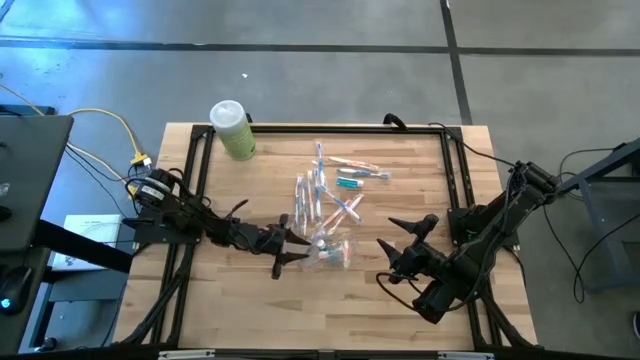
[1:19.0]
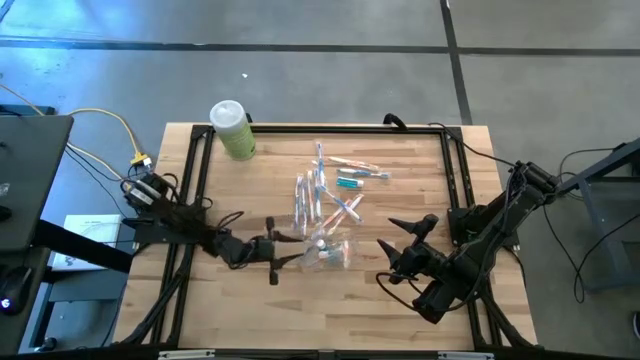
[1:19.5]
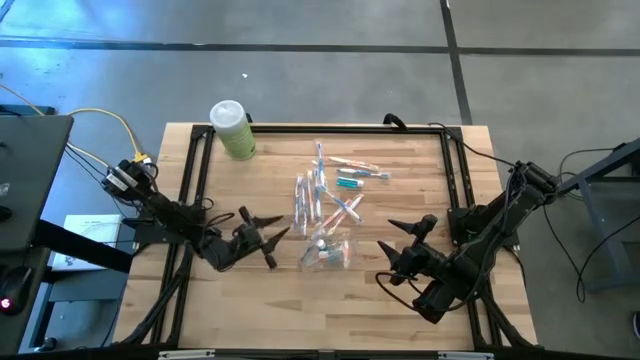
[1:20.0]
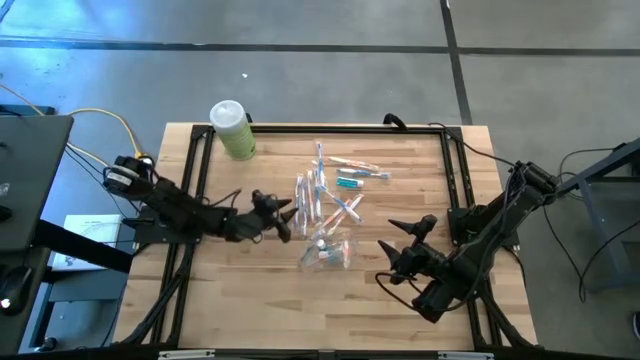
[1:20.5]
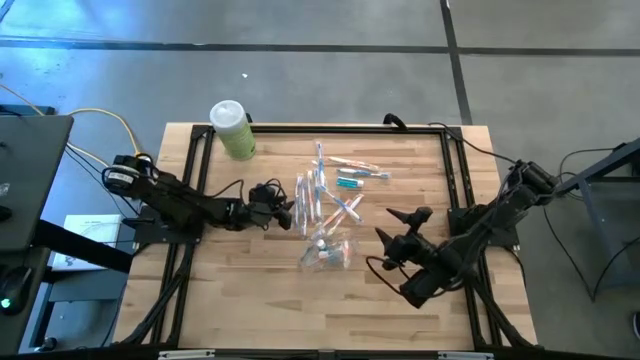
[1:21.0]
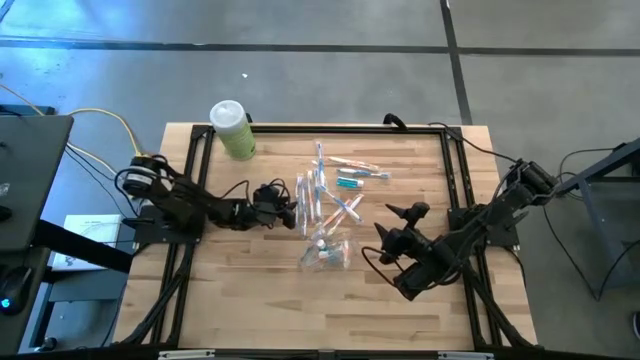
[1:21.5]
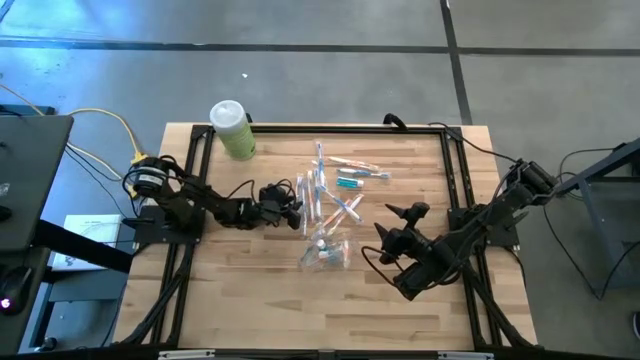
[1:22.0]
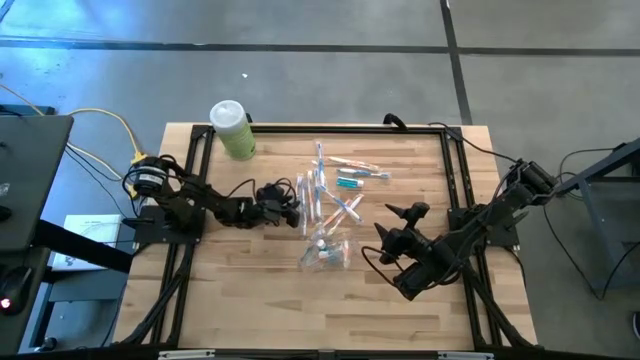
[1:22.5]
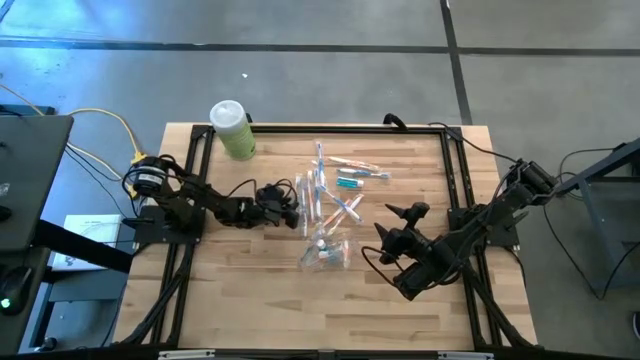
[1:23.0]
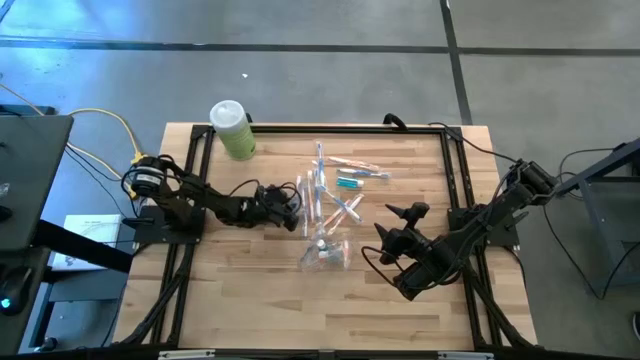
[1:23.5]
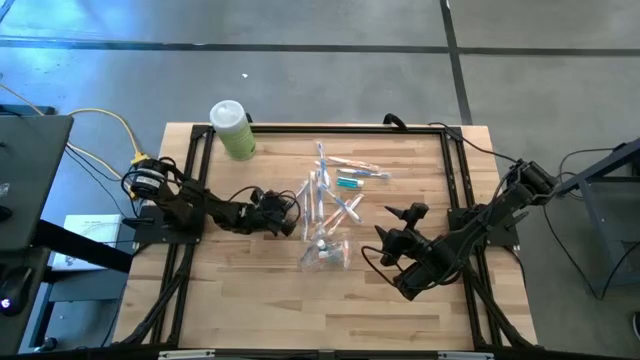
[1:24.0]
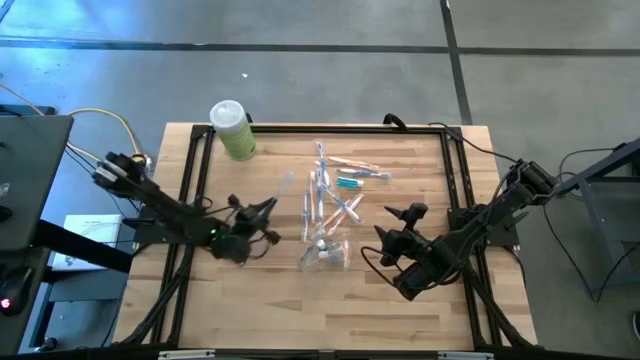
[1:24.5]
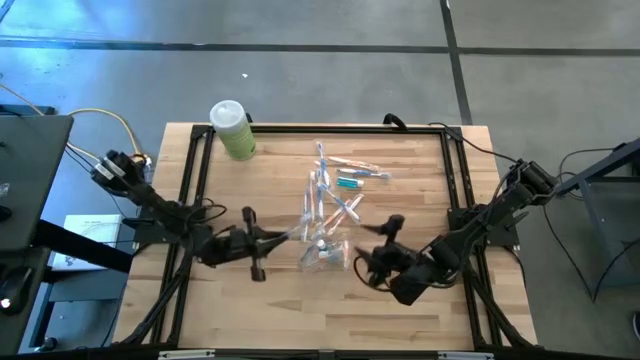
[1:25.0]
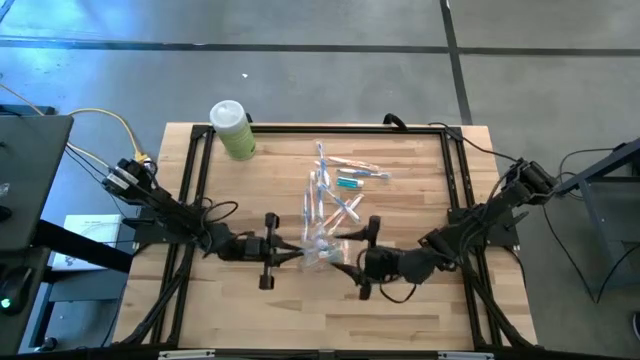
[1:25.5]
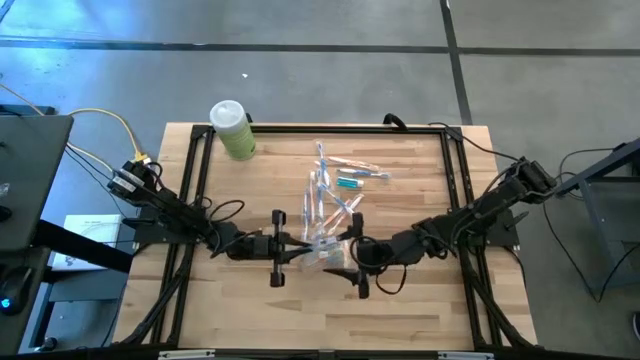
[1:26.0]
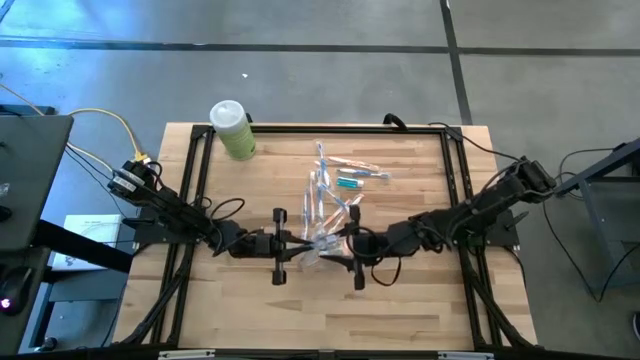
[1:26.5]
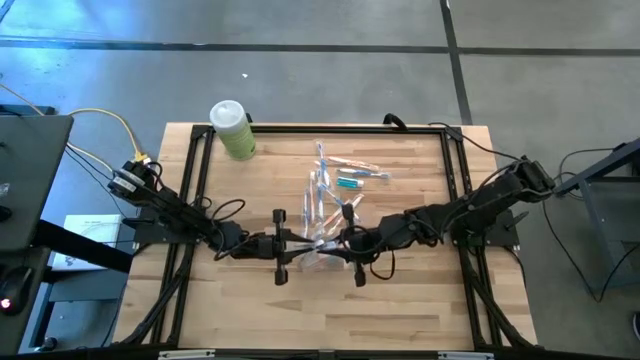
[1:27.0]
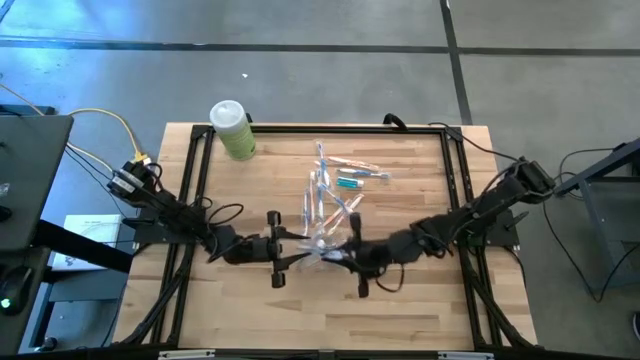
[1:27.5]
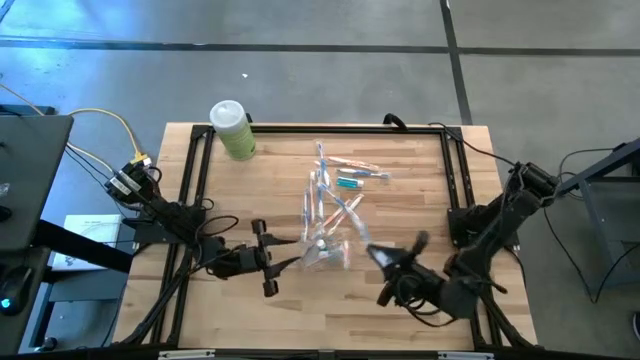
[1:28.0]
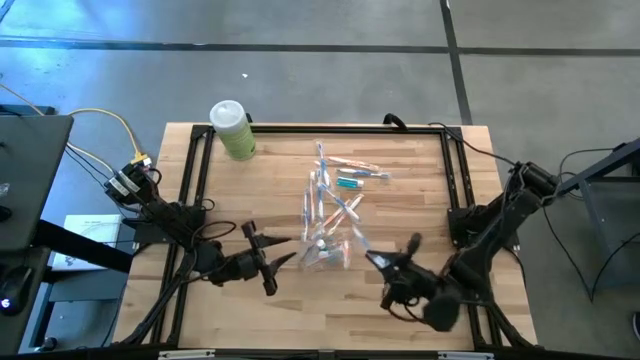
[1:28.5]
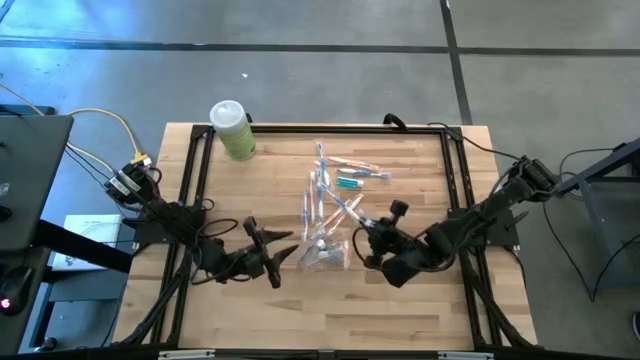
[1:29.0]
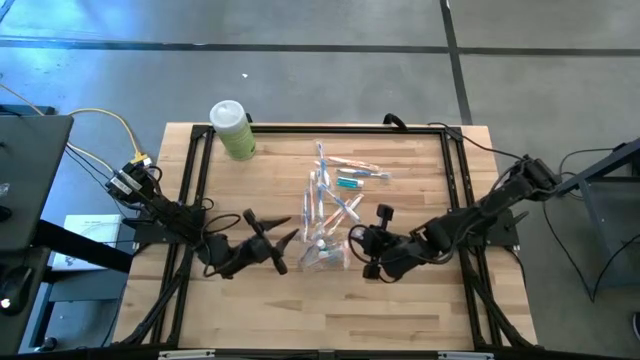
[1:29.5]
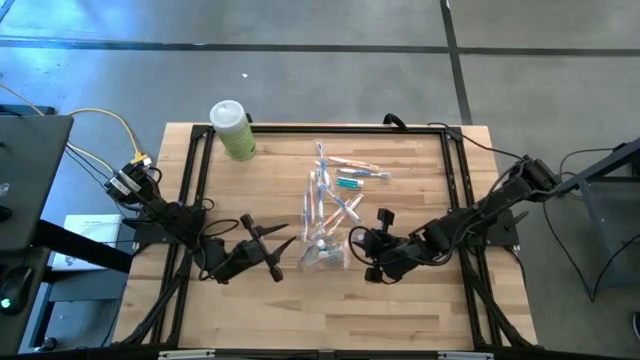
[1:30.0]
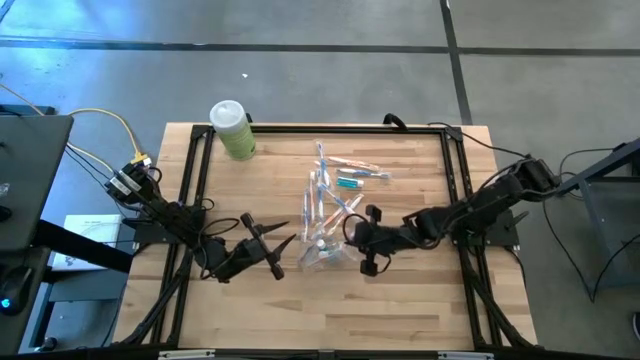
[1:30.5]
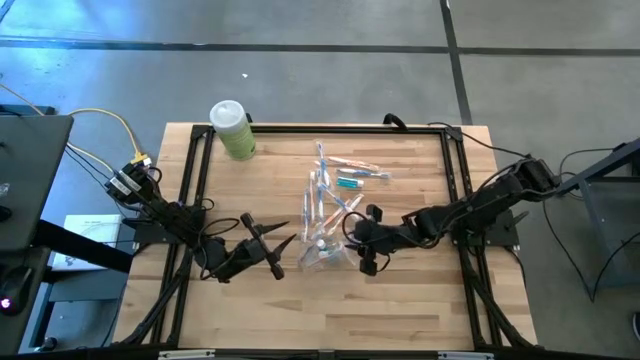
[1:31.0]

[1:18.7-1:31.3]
Task: Pick & Place toothbrushing station
Put the blue toothbrush into the transparent organizer

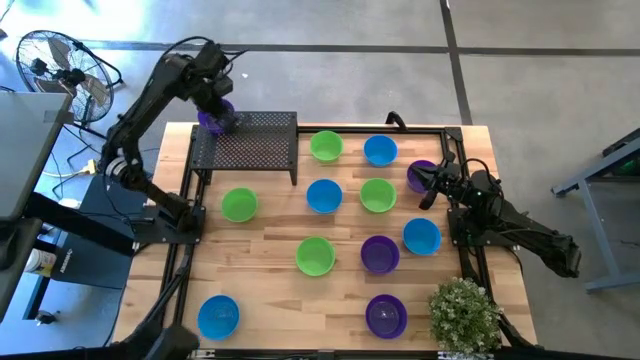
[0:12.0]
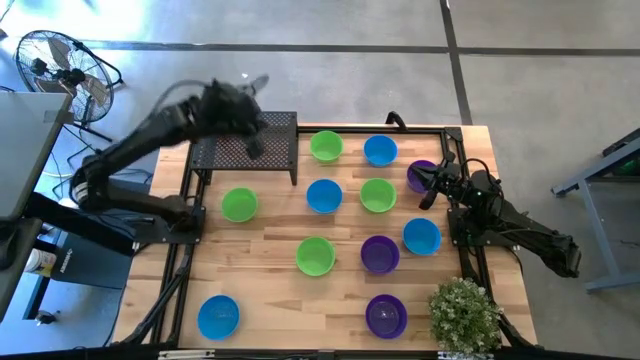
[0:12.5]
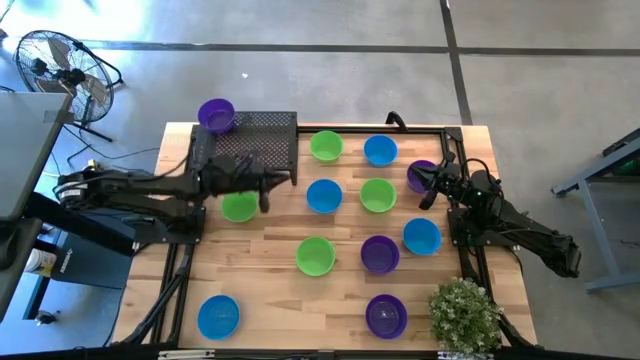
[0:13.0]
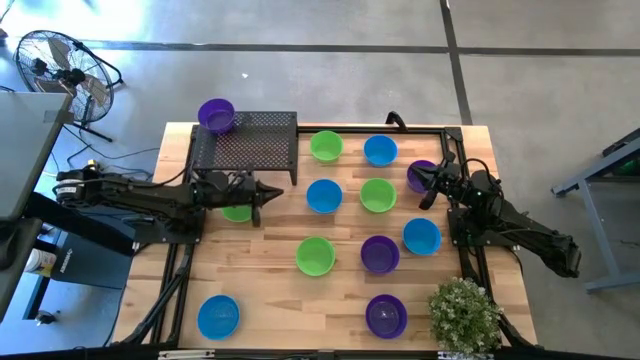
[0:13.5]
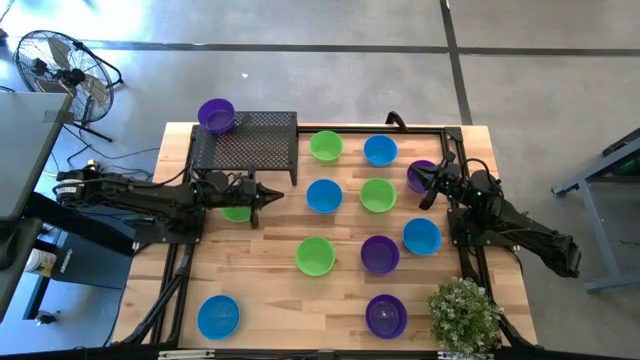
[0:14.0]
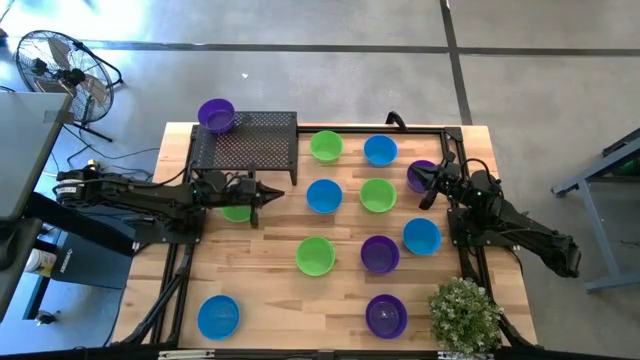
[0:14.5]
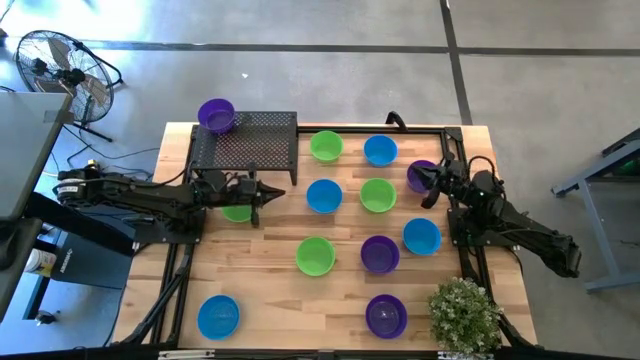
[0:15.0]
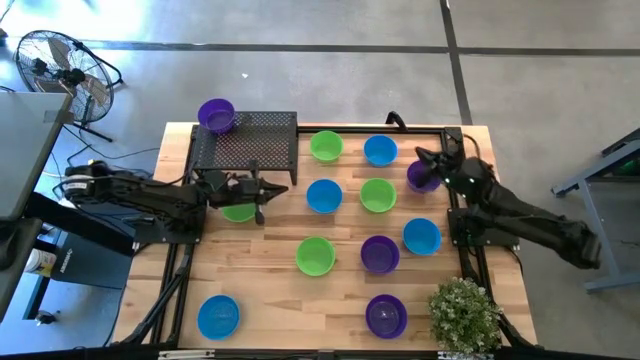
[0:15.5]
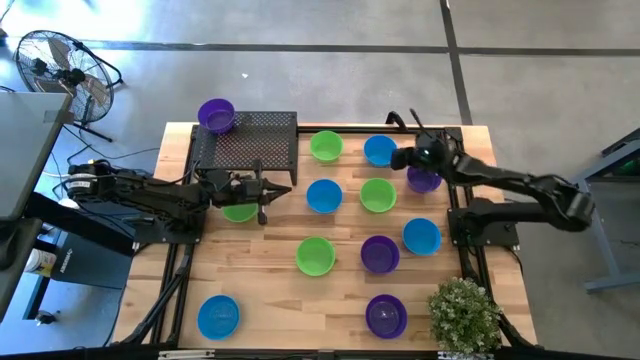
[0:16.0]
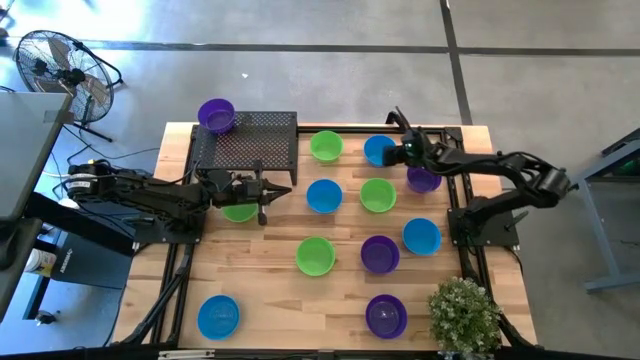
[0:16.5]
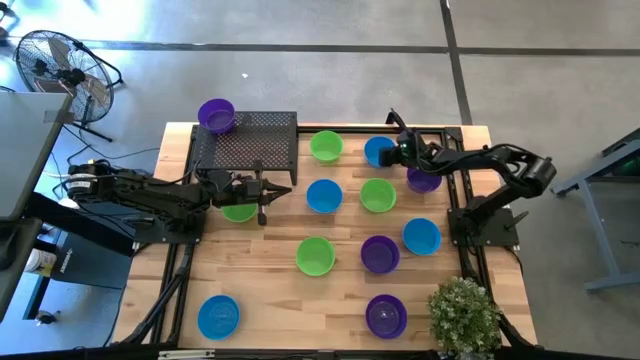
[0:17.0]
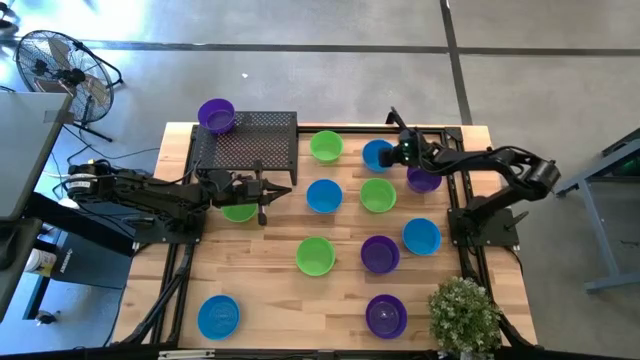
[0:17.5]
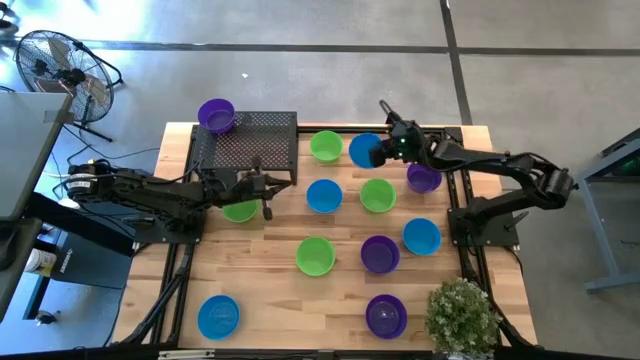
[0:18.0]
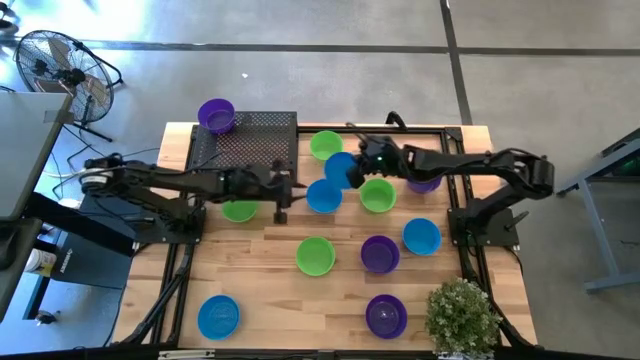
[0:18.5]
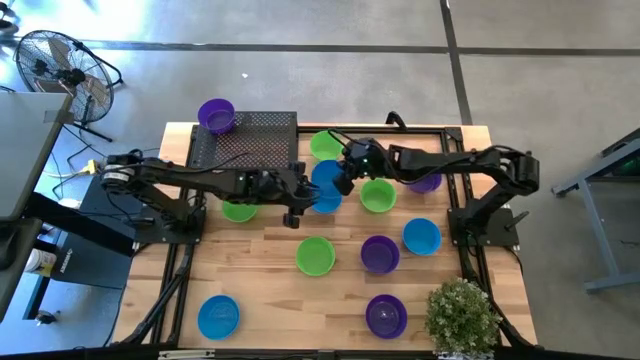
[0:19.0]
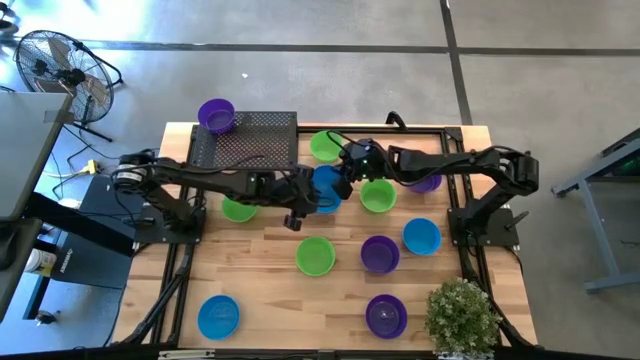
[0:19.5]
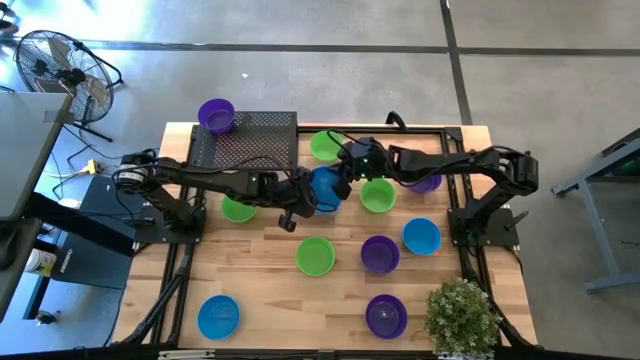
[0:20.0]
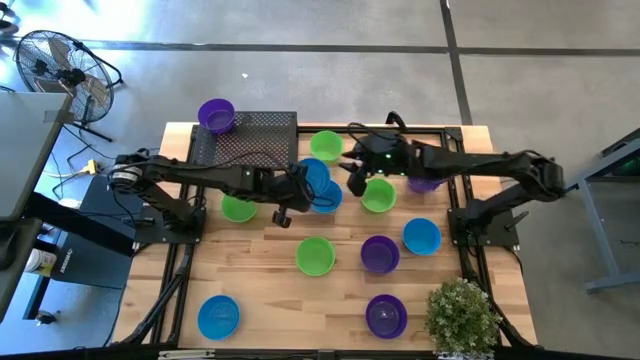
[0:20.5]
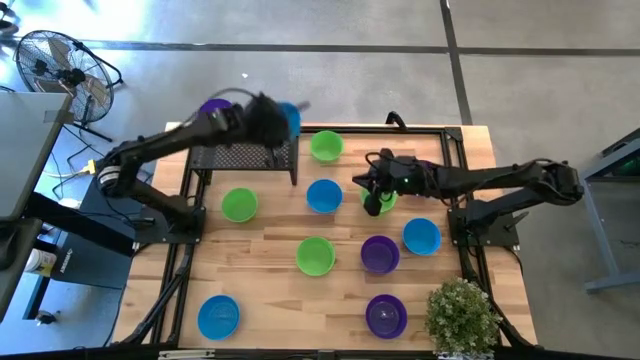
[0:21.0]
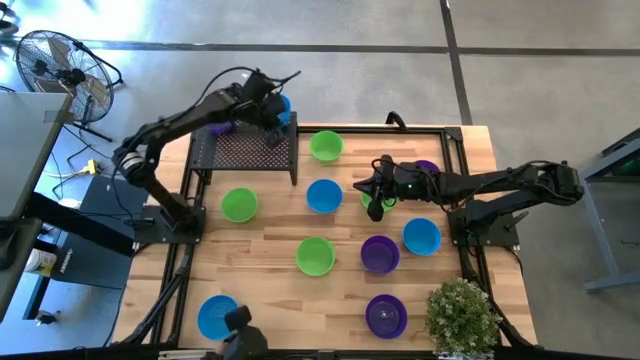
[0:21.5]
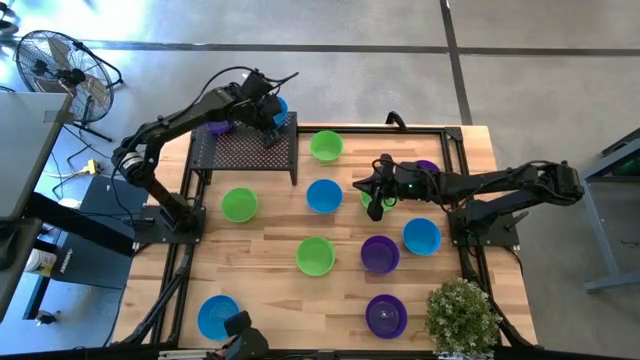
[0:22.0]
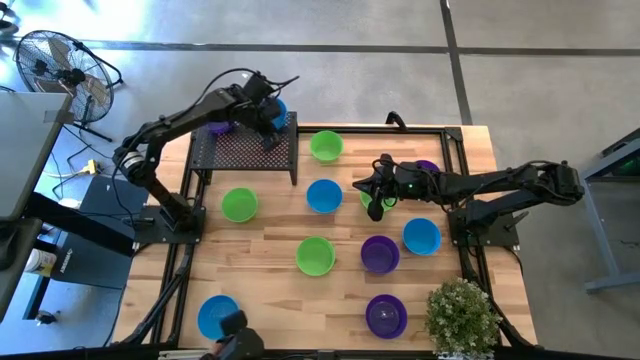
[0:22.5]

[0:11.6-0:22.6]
Task: Pick & Place Mini bowls
Put the blue bowl on the shelf
